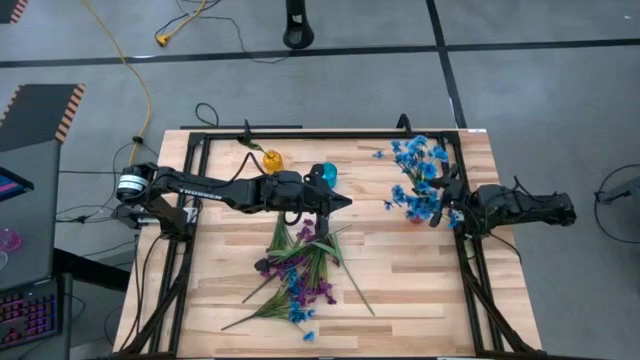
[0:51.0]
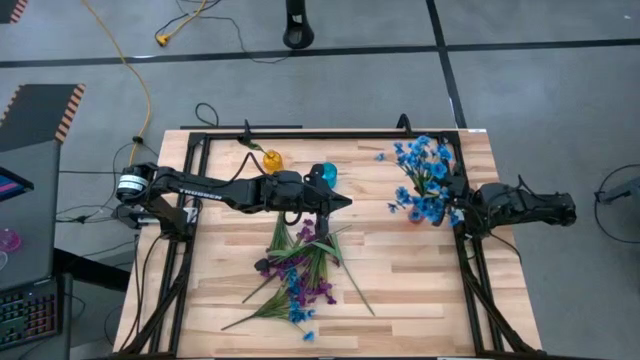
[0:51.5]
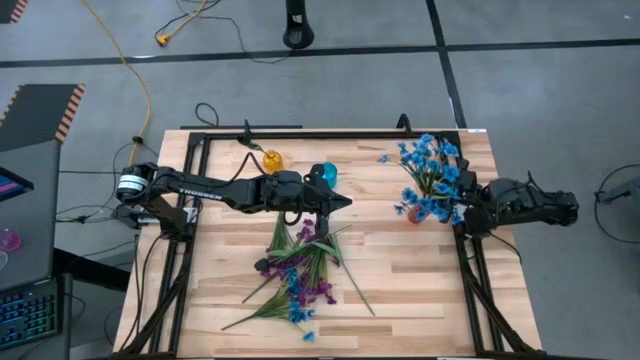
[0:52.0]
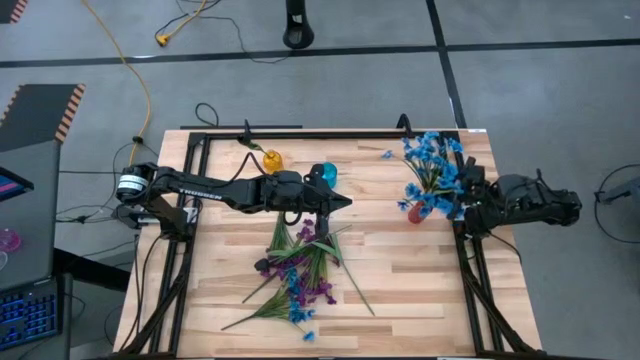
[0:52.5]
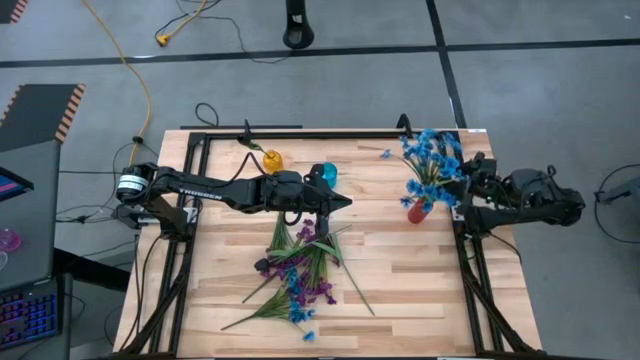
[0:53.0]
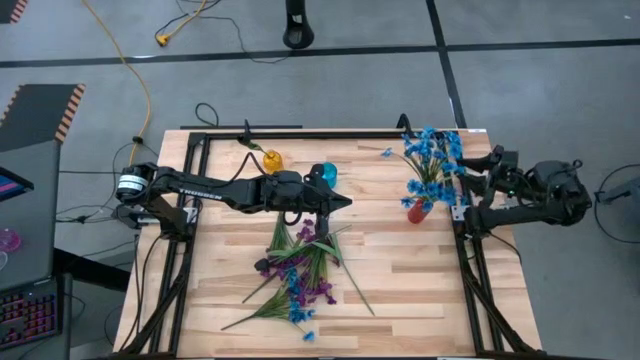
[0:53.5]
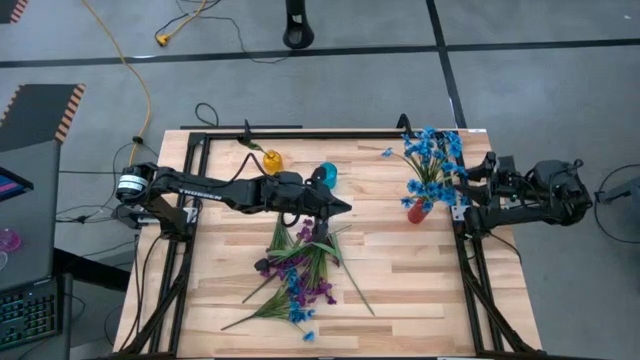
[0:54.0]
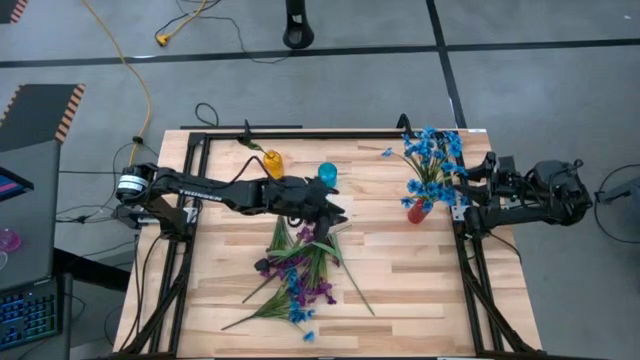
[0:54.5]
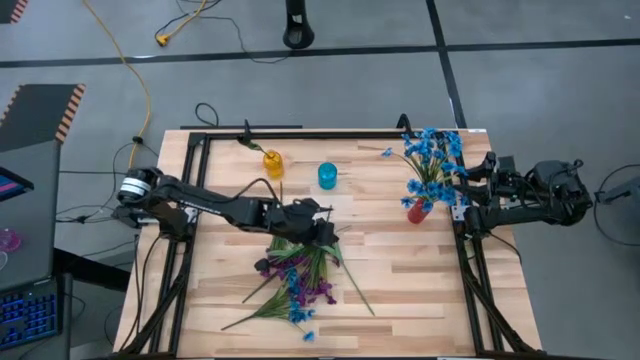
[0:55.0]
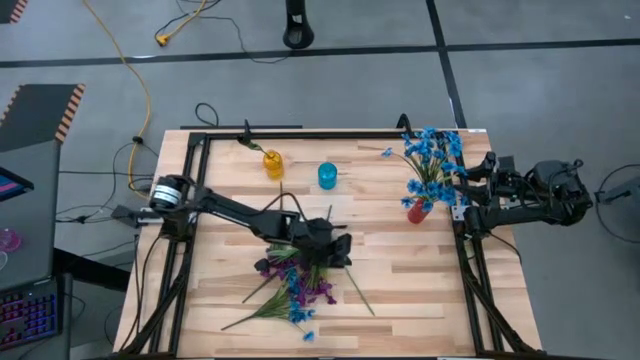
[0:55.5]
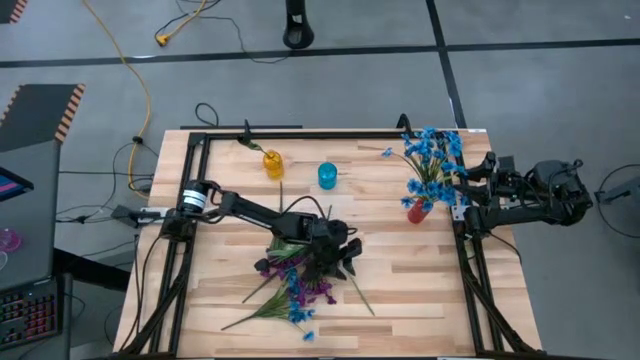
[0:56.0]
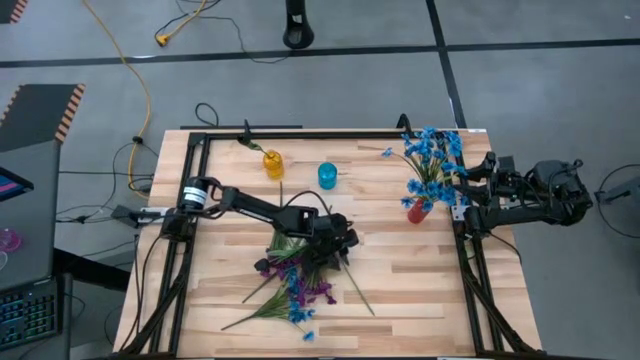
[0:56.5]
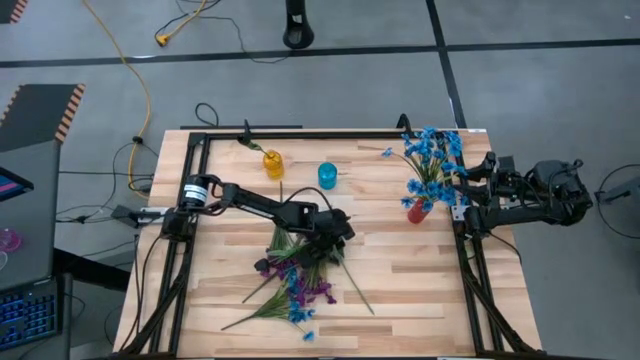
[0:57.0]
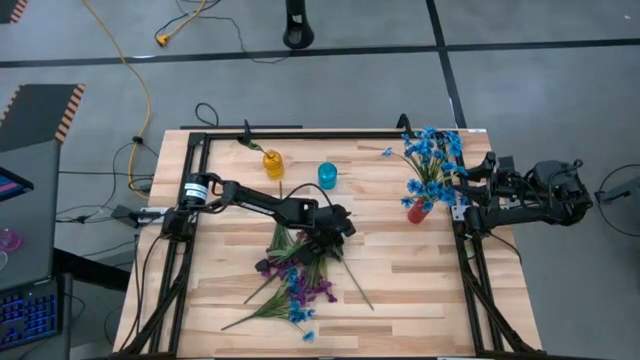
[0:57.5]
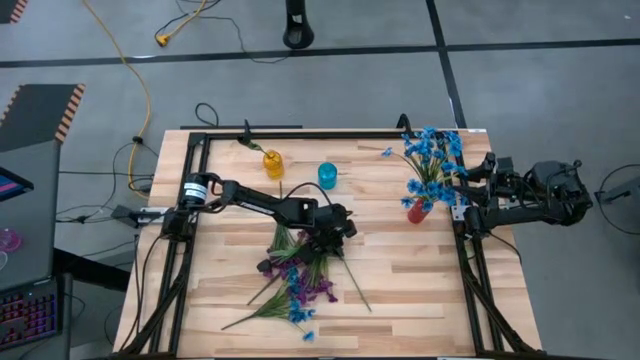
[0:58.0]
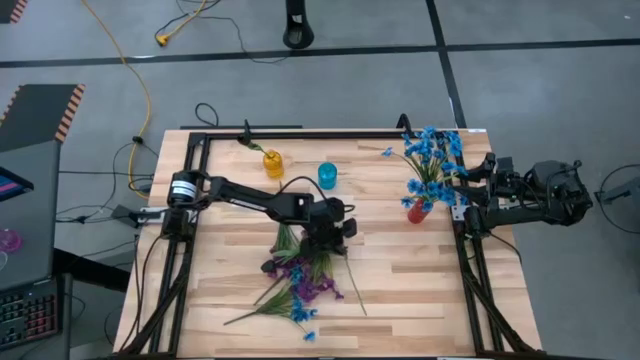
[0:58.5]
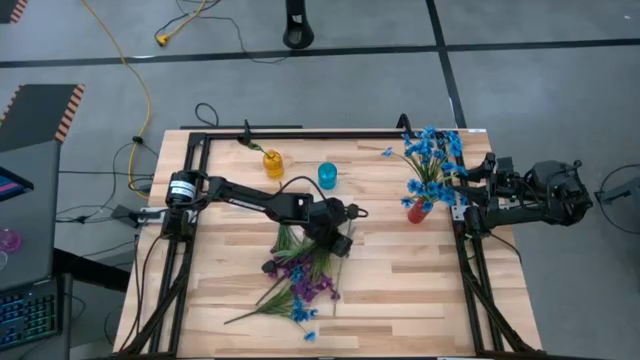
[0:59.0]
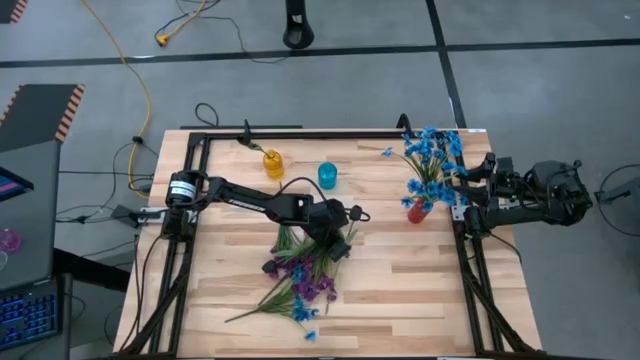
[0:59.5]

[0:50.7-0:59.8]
Task: Sort flowers into vase by color
Put the right black tulip into the yellow vase

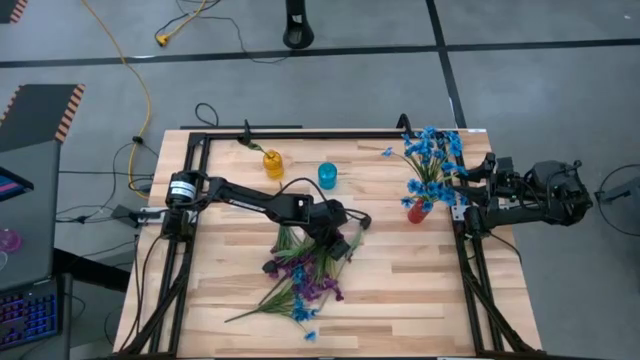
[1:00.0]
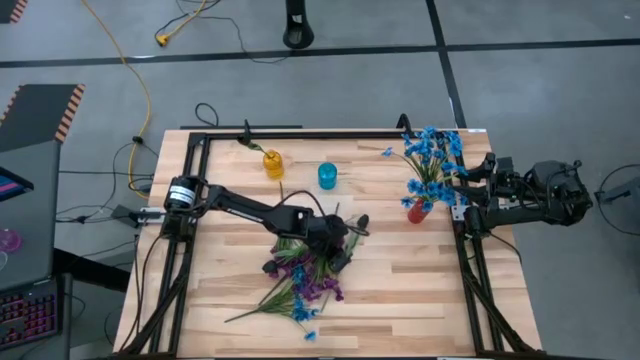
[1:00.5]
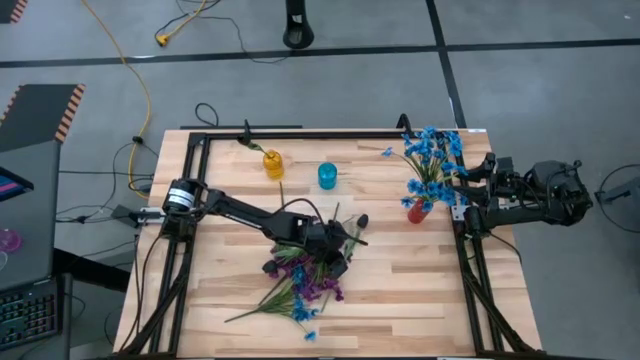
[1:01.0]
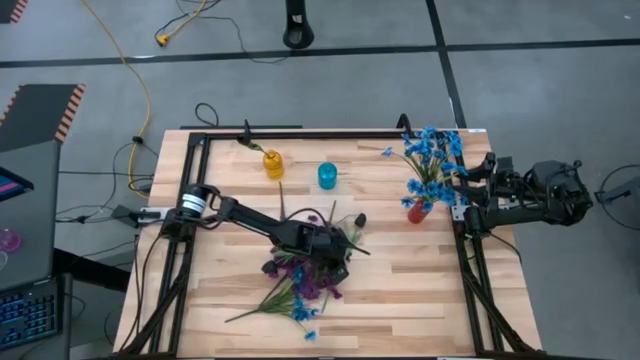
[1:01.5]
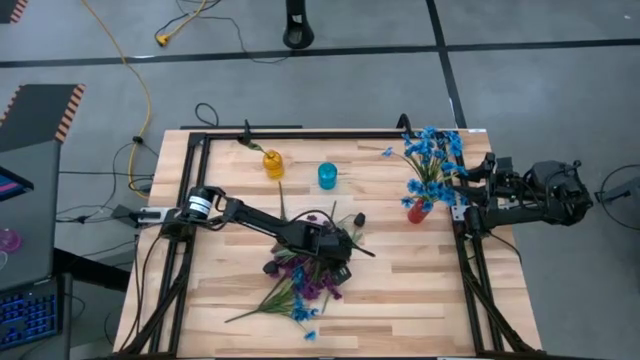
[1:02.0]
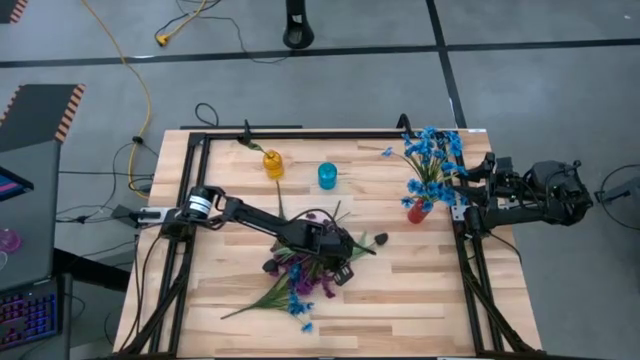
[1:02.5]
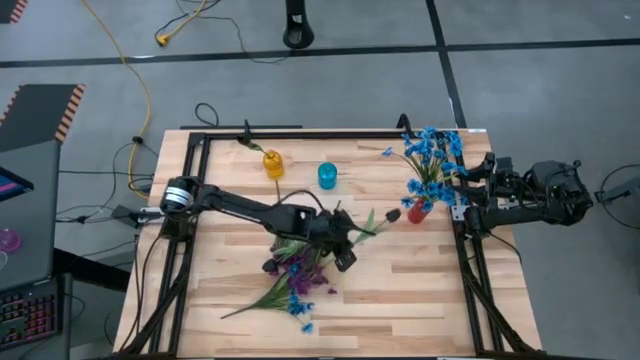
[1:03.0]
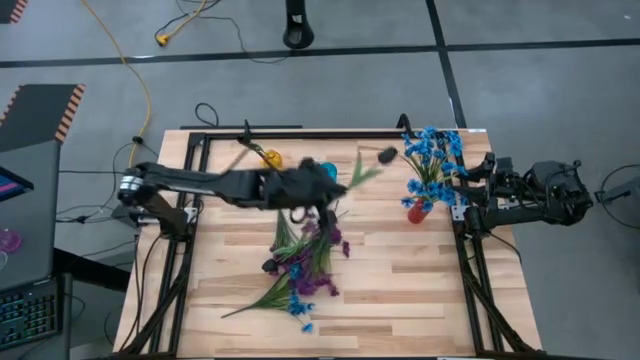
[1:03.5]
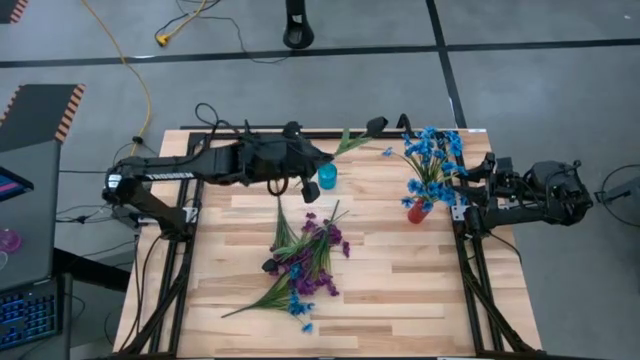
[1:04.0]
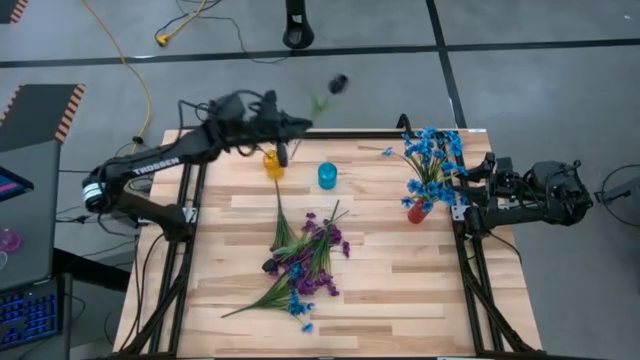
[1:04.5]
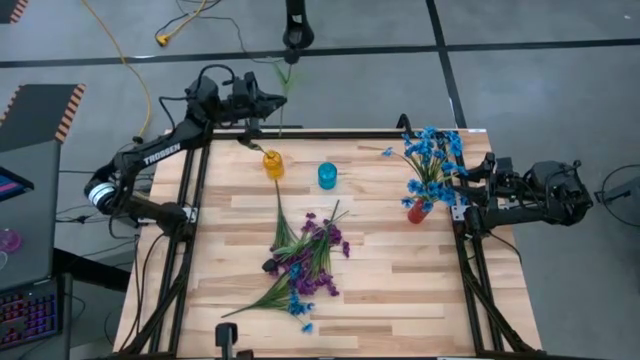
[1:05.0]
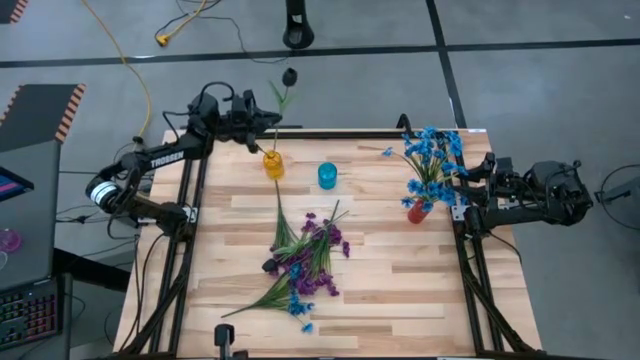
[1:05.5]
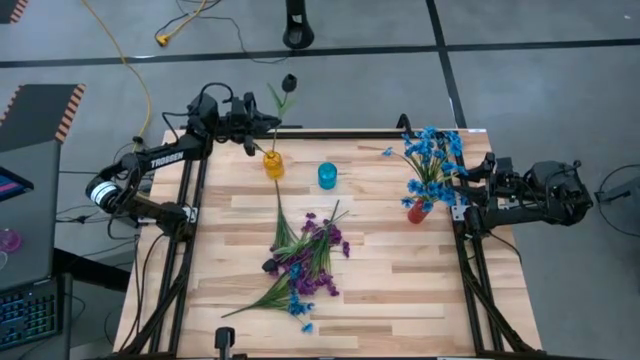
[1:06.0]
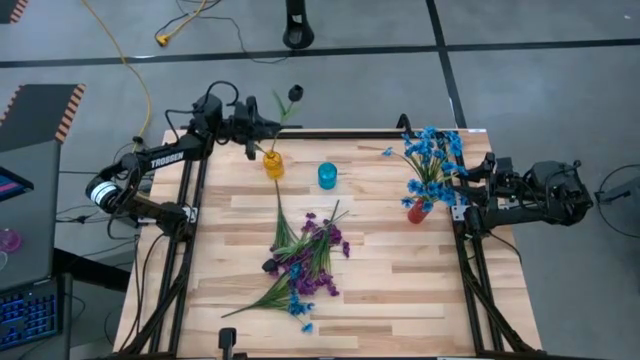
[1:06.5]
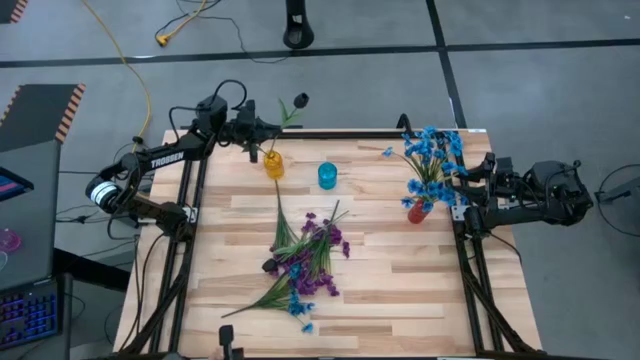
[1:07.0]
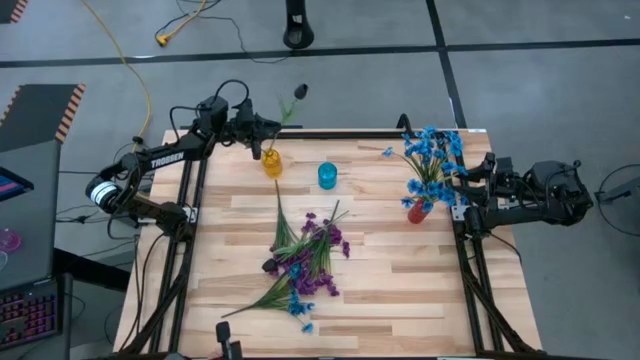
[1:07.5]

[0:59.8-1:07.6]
Put the right black tulip into the yellow vase
